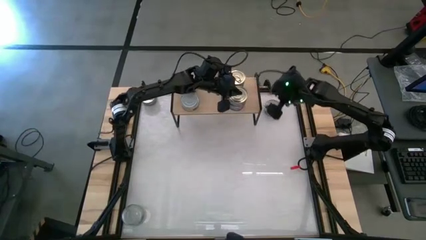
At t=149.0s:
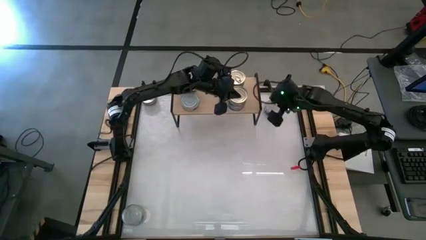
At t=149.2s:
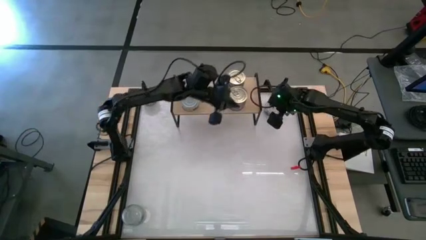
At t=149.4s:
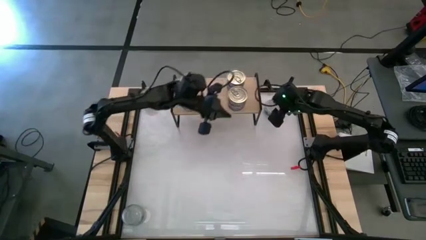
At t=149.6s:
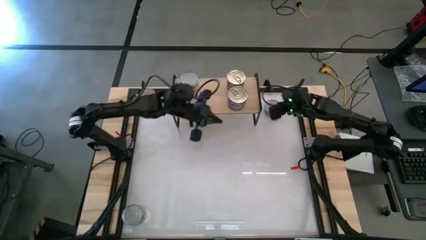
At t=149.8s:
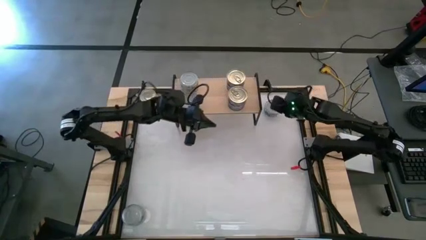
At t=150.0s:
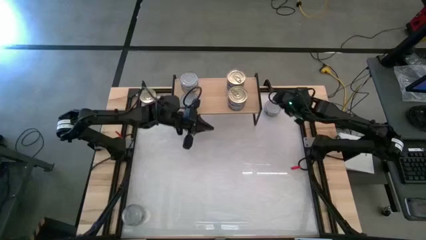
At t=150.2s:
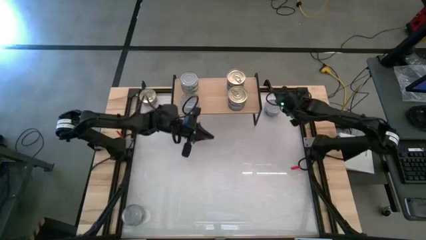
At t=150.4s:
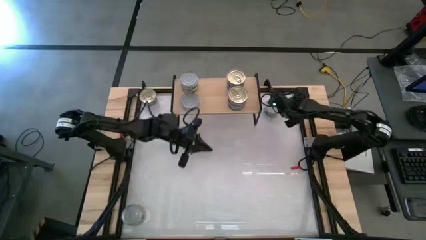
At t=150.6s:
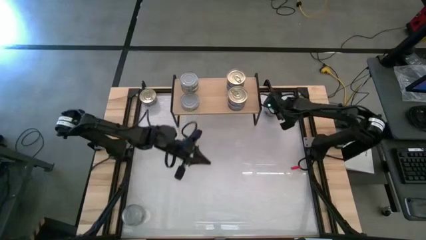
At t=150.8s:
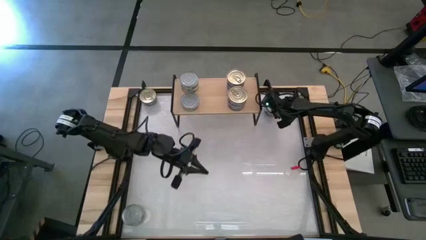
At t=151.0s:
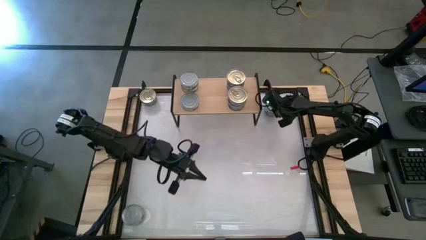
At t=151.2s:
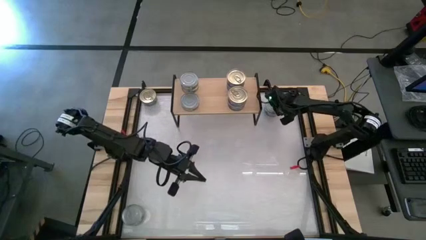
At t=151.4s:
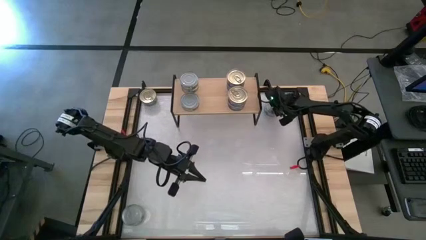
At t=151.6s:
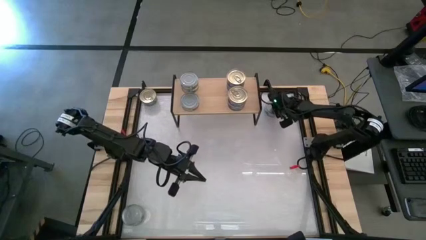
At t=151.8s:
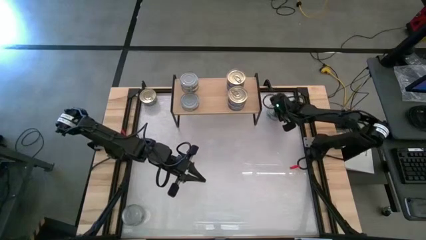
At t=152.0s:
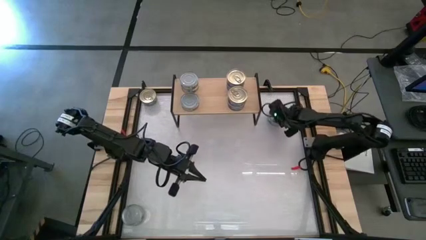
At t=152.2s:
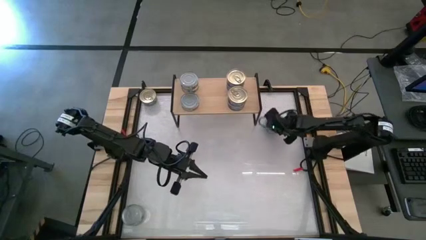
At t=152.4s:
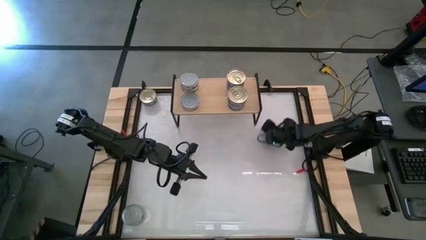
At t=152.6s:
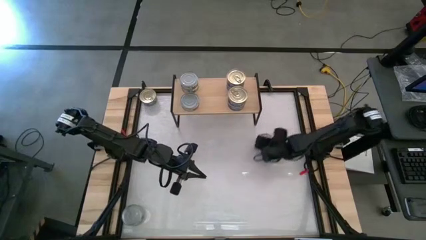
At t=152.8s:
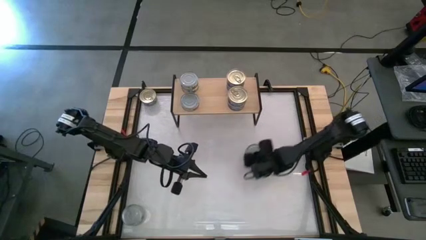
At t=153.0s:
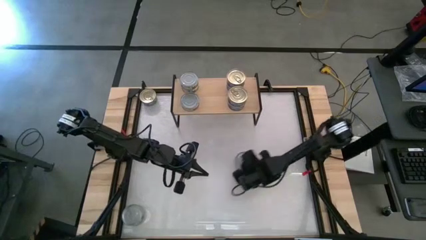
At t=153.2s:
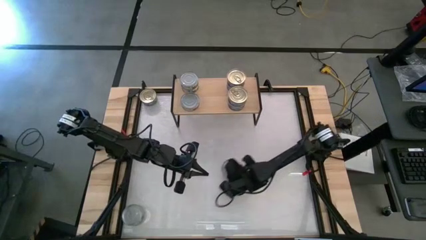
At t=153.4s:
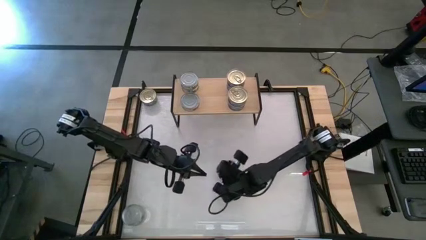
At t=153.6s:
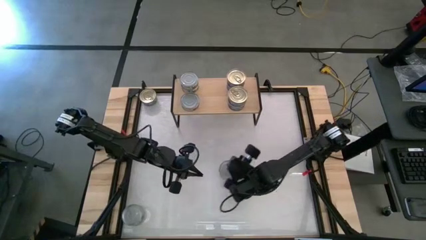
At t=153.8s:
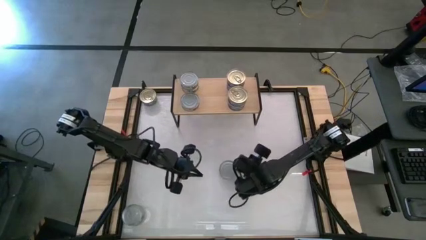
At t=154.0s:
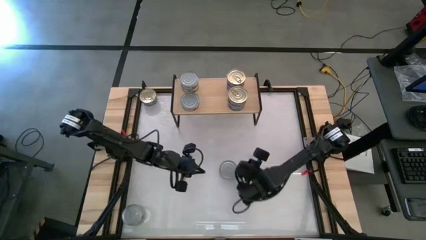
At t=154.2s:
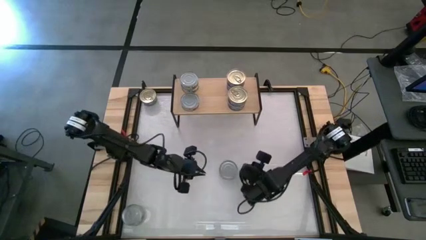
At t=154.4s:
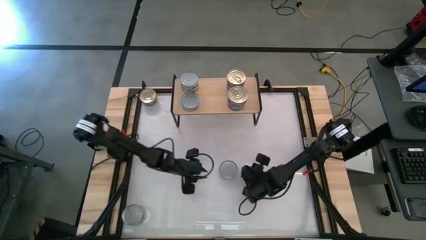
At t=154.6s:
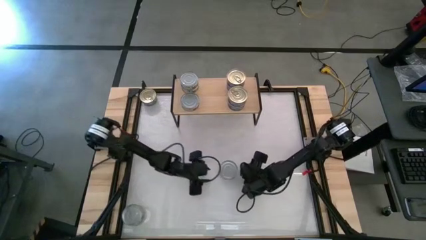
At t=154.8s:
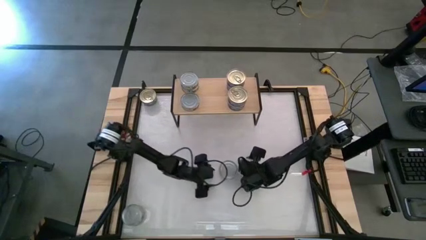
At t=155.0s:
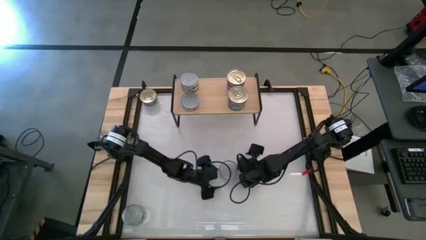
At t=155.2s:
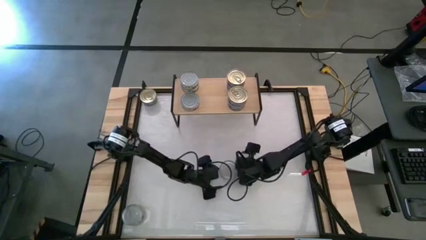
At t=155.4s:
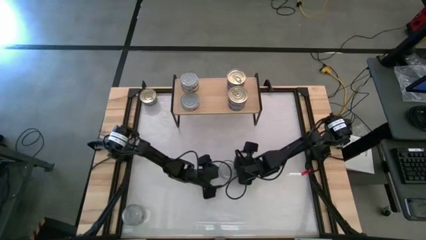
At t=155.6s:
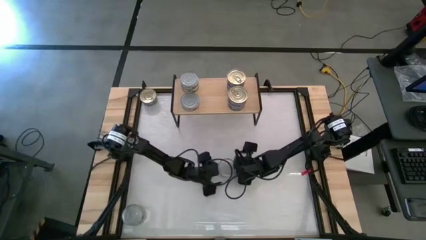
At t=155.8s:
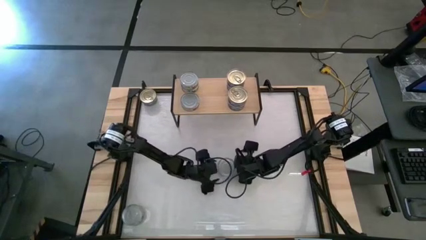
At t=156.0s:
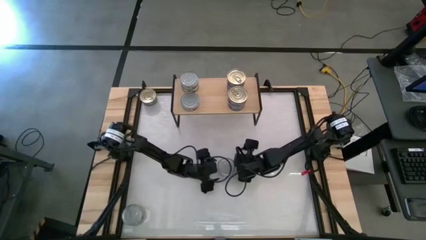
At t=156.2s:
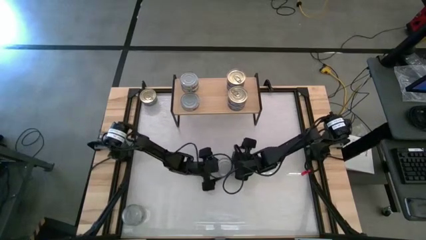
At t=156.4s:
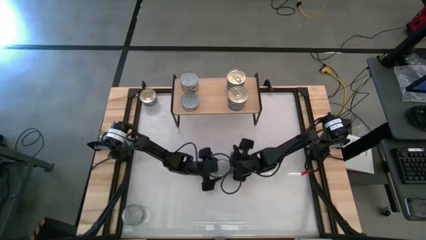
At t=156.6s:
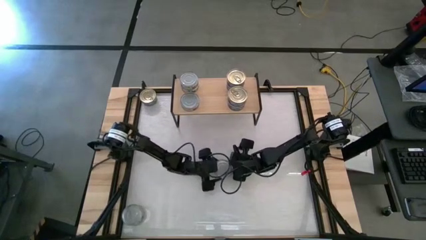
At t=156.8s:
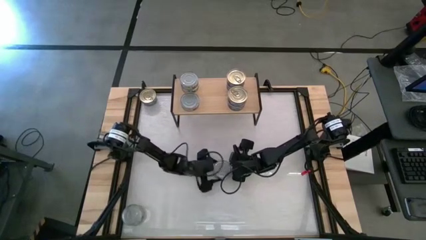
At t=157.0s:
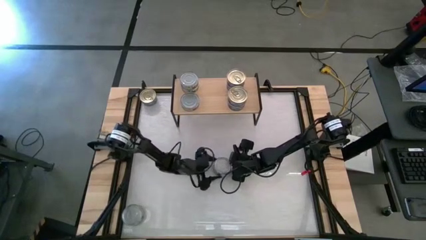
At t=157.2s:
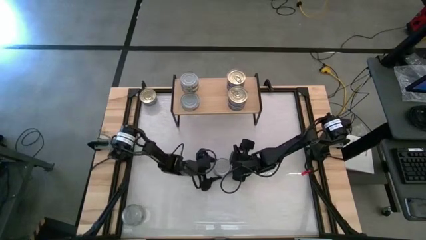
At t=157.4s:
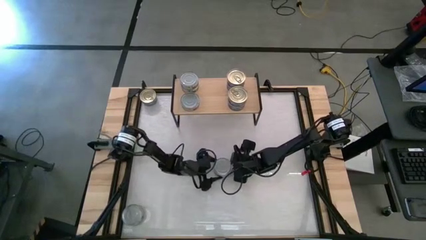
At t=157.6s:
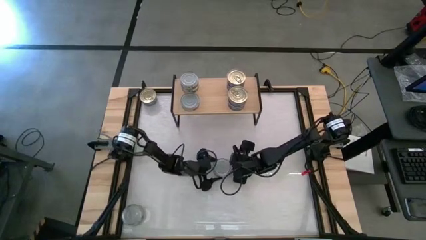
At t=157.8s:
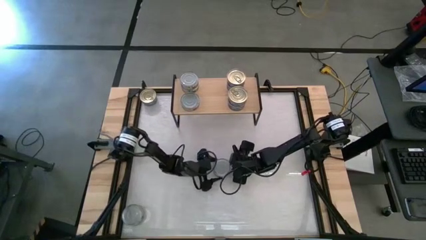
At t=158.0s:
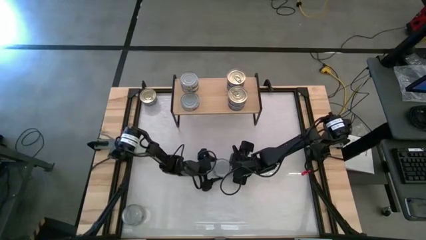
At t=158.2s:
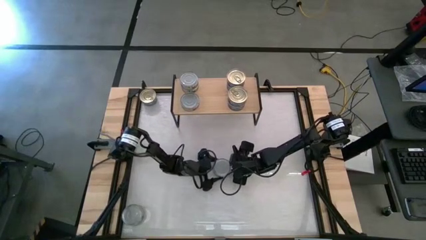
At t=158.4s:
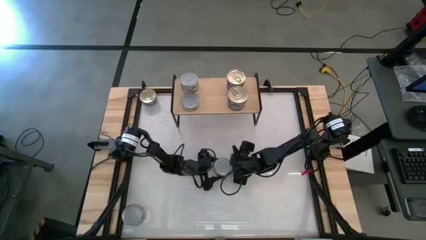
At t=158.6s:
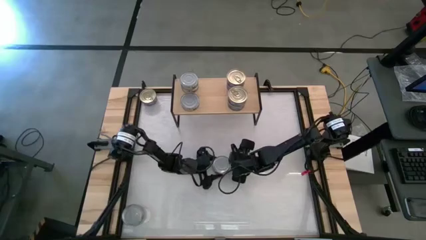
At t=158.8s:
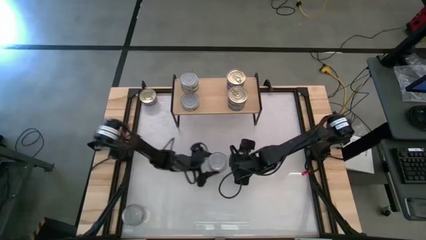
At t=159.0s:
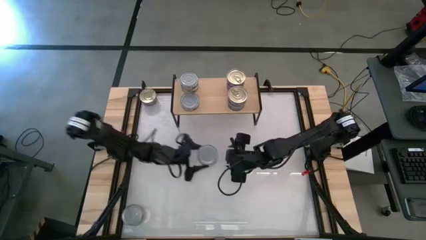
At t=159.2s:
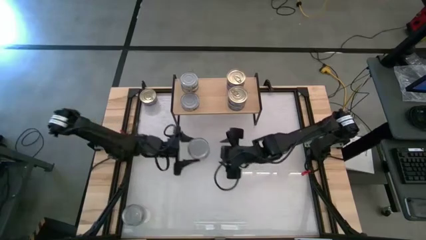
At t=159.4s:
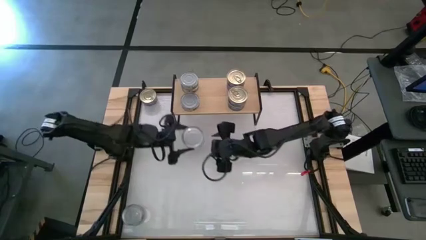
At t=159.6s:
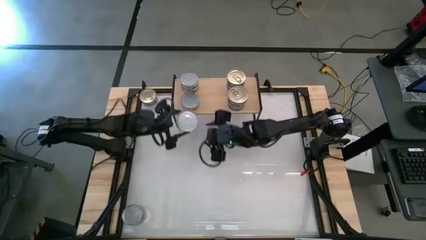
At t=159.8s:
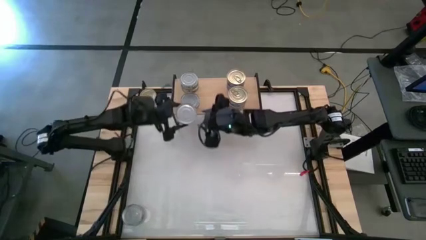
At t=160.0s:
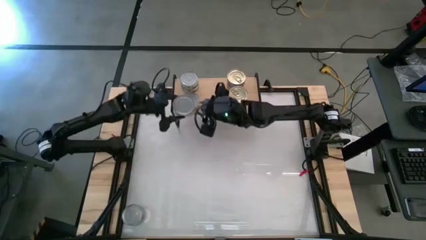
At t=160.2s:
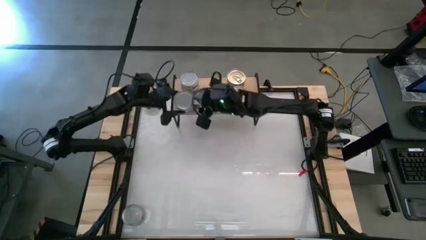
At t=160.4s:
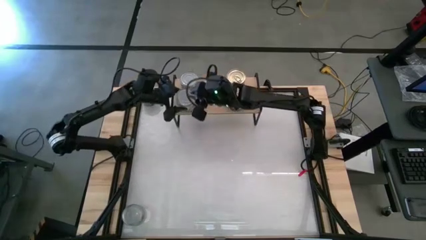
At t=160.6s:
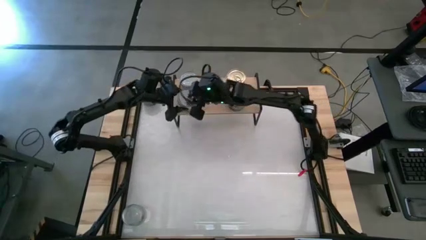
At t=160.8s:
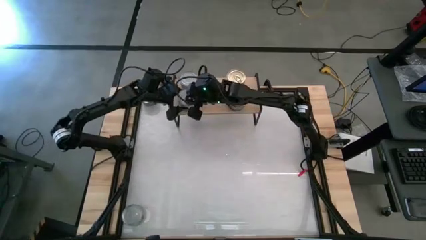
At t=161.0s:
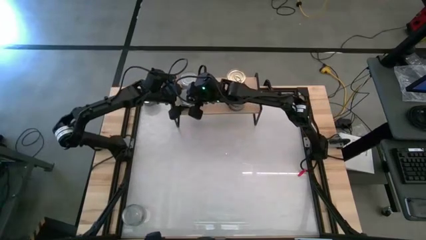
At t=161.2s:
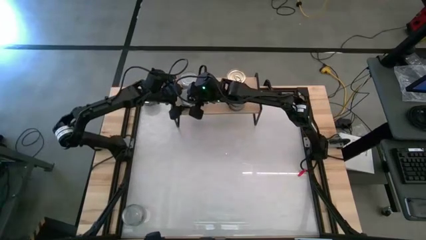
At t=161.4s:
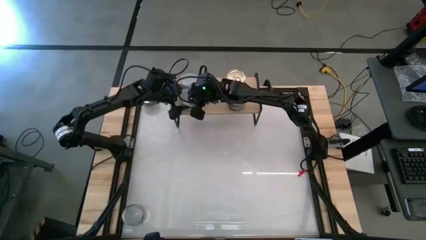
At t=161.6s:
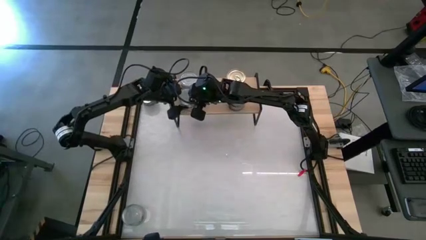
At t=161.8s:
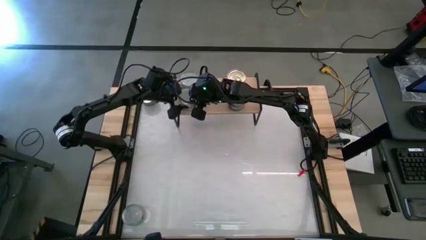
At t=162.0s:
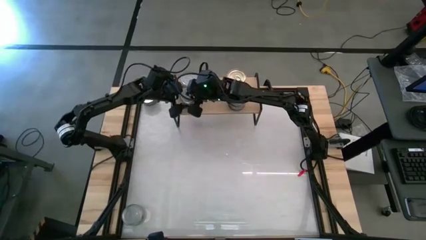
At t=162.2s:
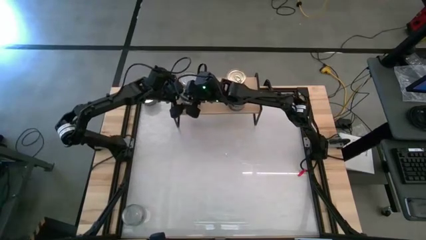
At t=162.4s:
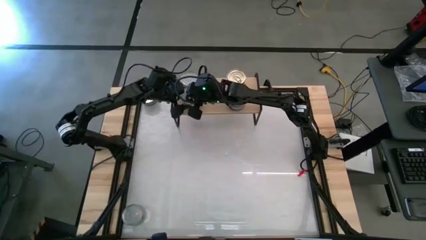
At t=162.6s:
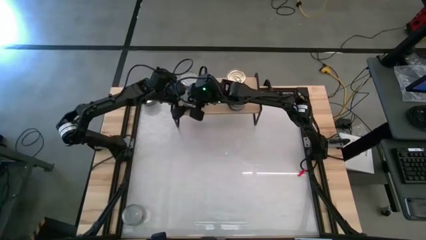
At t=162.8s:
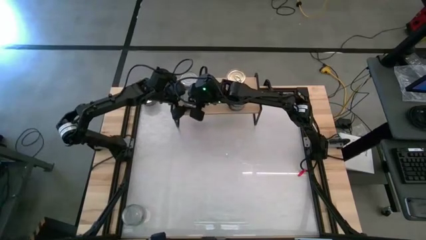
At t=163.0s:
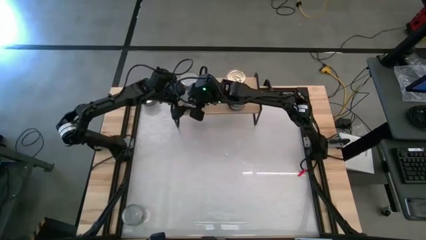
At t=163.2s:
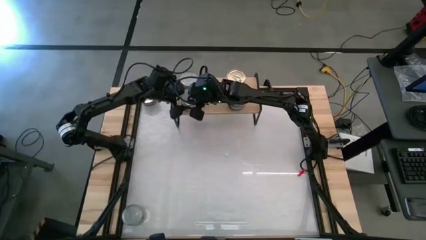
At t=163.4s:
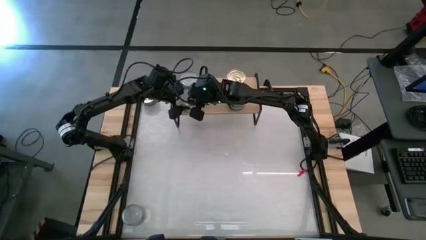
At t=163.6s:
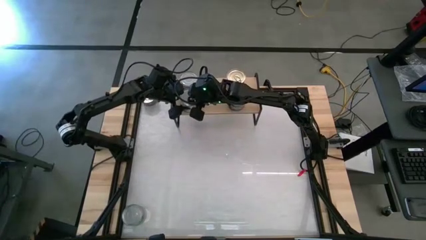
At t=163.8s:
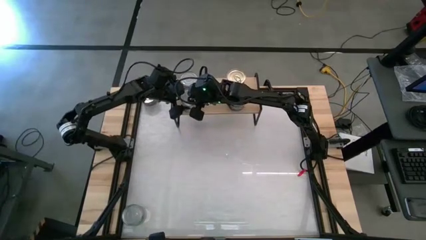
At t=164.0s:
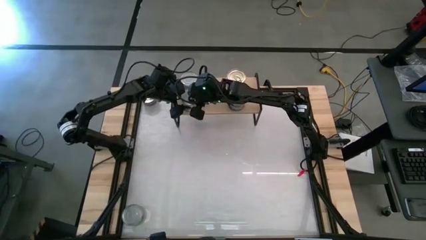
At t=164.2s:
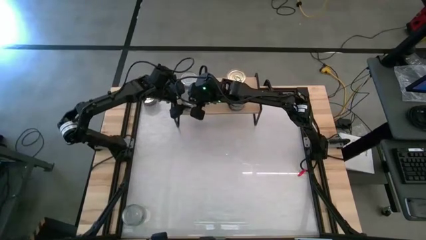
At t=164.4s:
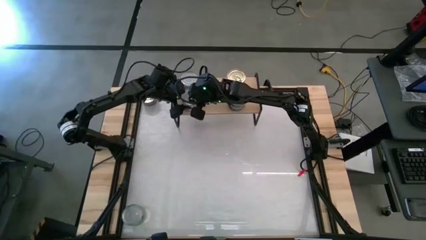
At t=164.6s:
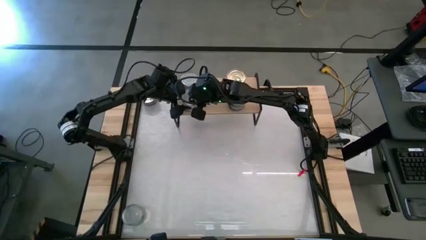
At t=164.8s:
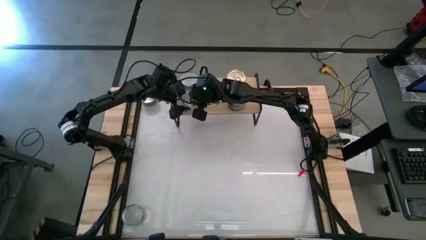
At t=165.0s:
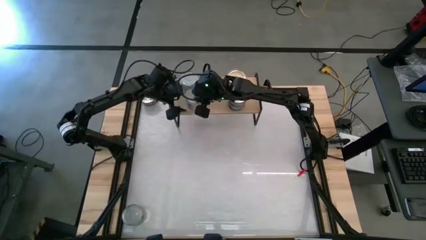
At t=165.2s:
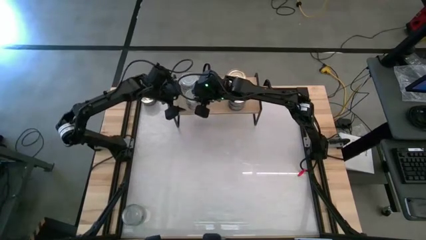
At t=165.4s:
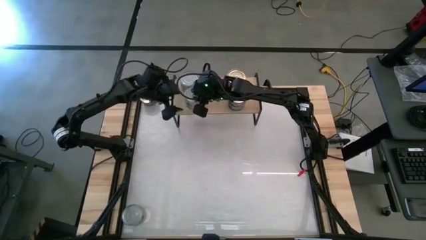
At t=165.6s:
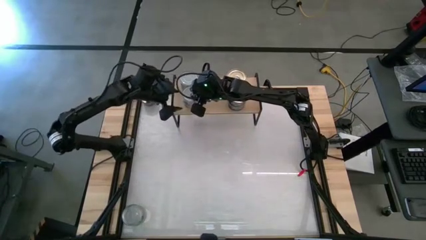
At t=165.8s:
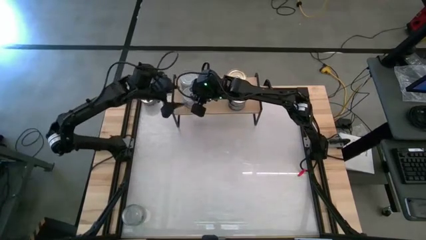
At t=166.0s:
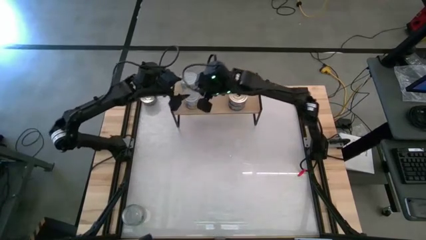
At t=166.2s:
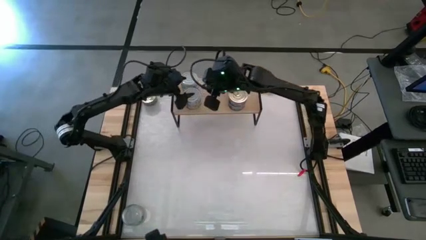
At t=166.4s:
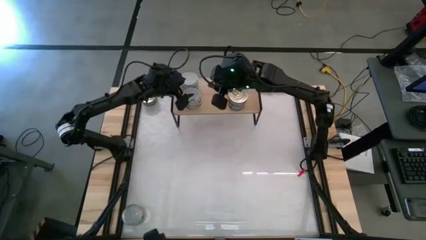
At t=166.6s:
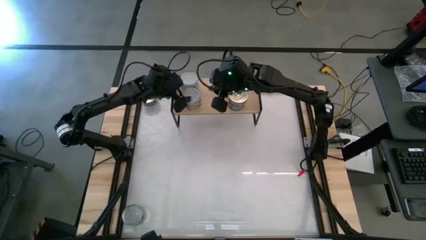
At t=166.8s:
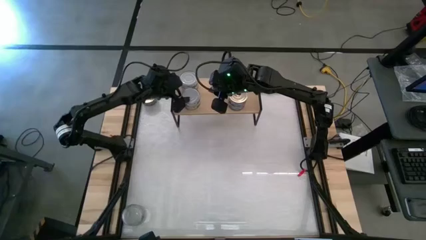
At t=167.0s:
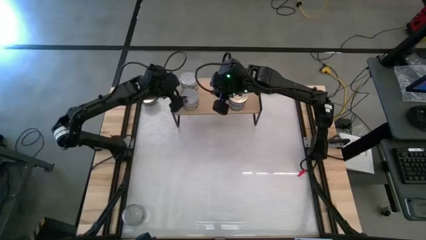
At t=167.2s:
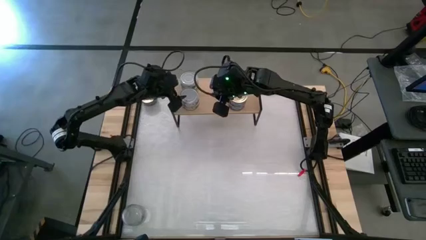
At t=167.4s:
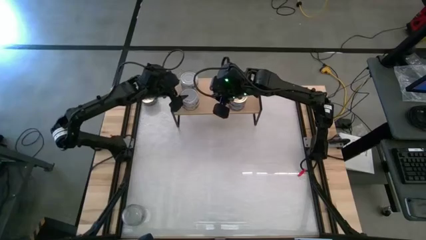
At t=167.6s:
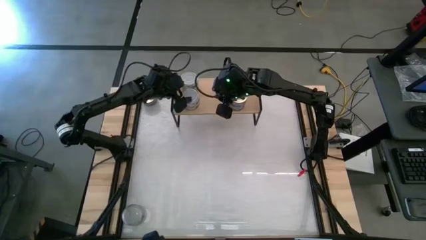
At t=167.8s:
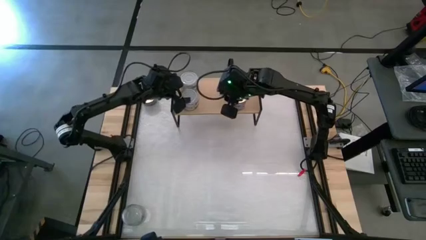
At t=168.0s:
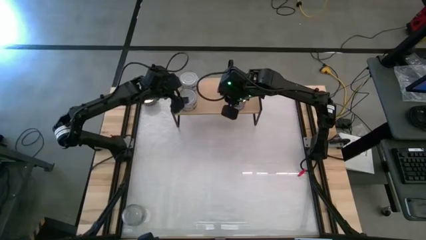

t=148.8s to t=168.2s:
Task: Stack canned seafood by type on shelf
Stack the green tuna can on top of the green tuna can on the shelf
